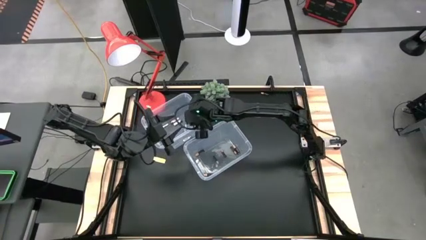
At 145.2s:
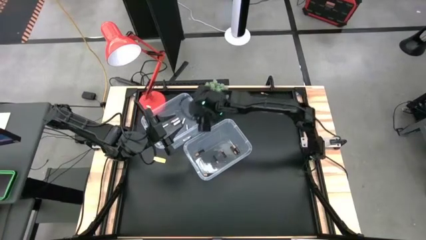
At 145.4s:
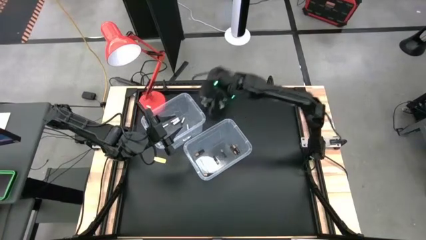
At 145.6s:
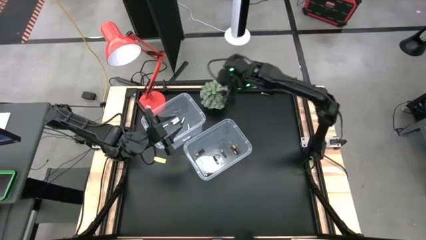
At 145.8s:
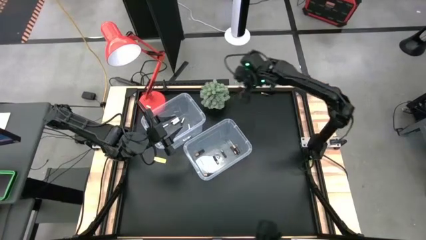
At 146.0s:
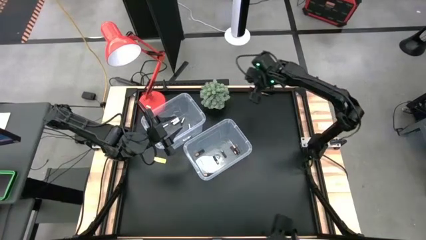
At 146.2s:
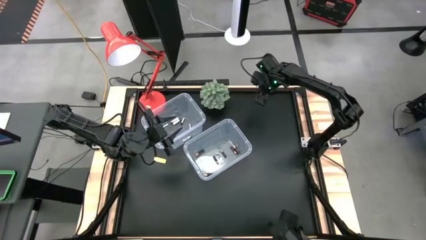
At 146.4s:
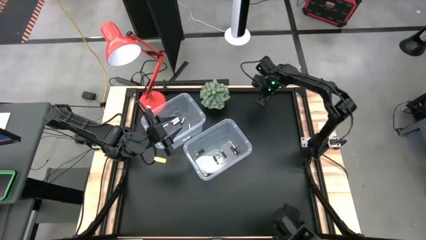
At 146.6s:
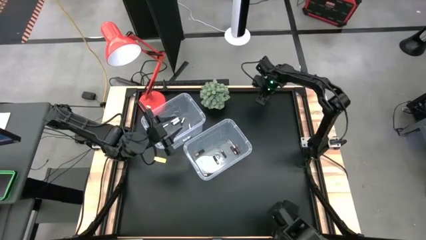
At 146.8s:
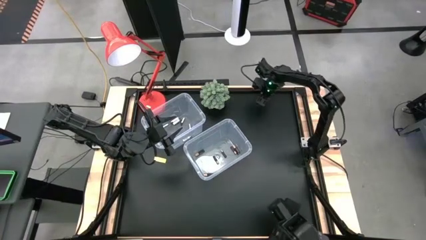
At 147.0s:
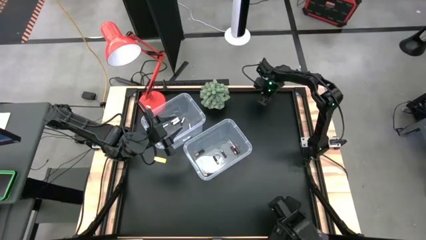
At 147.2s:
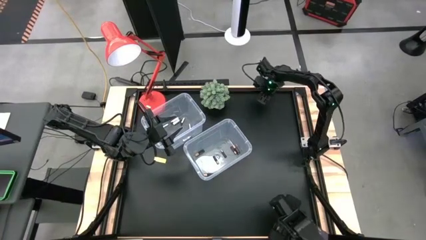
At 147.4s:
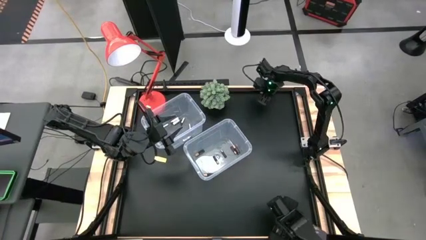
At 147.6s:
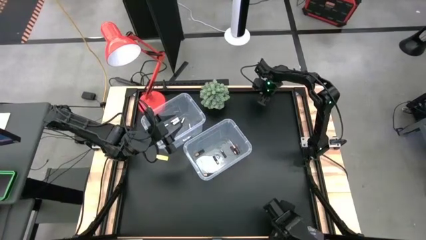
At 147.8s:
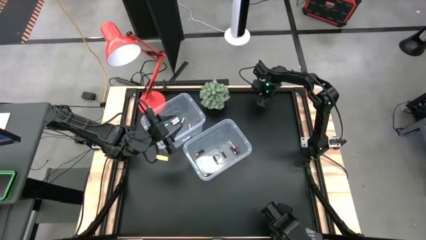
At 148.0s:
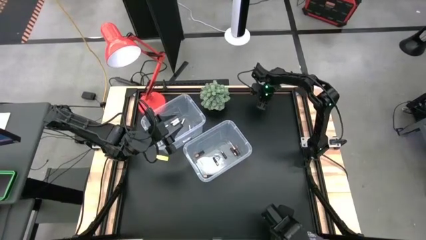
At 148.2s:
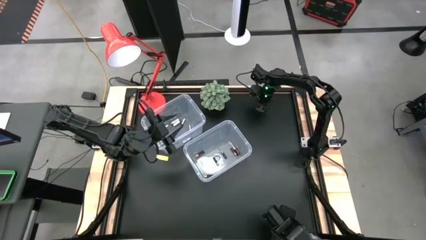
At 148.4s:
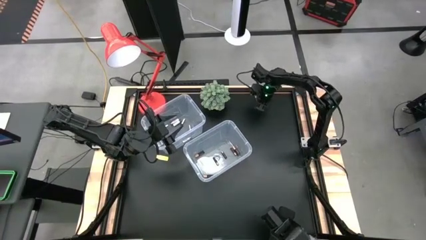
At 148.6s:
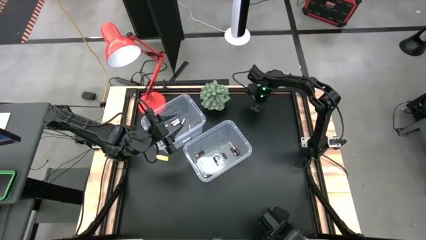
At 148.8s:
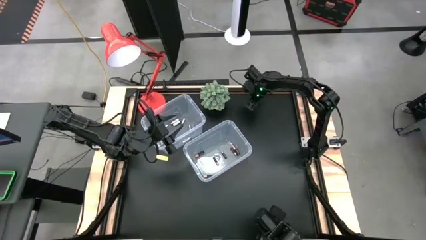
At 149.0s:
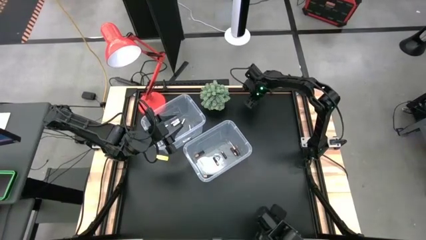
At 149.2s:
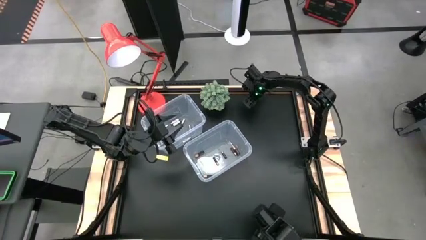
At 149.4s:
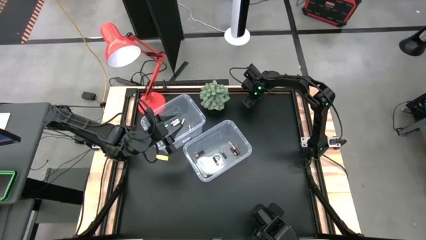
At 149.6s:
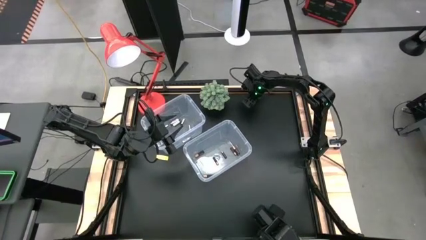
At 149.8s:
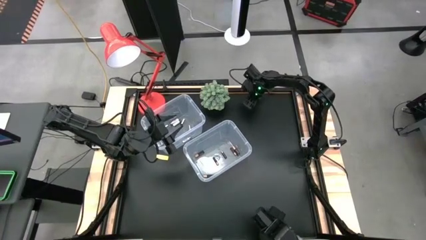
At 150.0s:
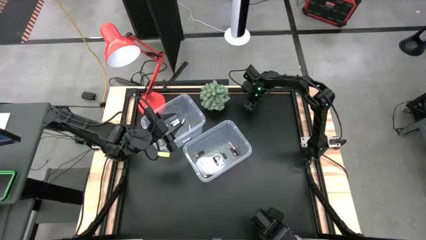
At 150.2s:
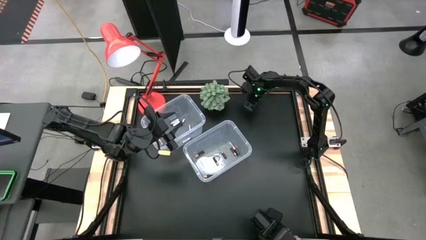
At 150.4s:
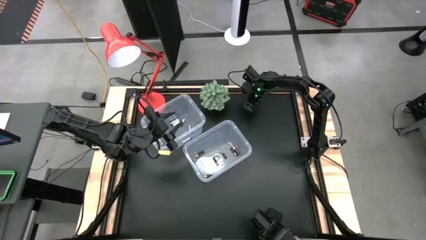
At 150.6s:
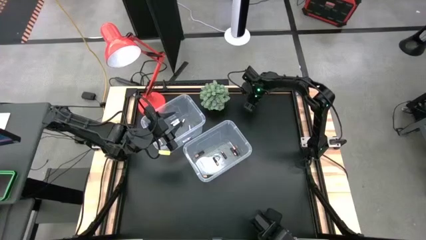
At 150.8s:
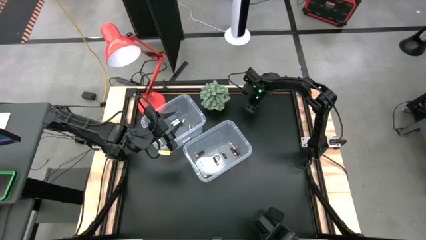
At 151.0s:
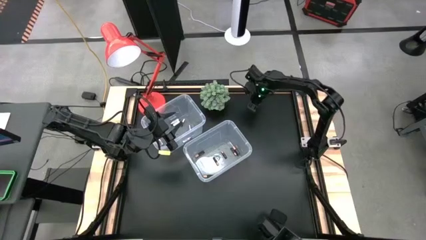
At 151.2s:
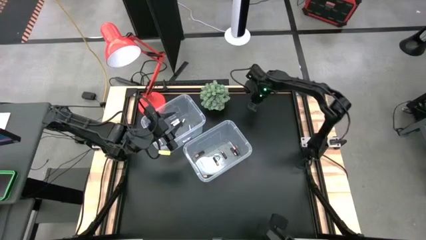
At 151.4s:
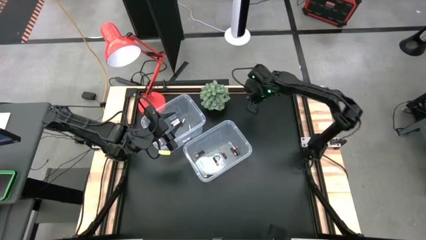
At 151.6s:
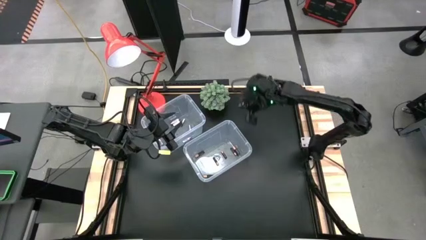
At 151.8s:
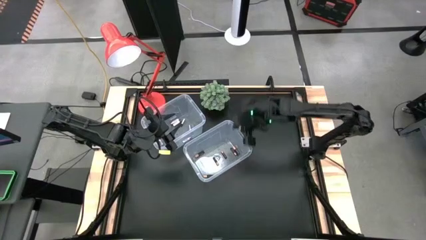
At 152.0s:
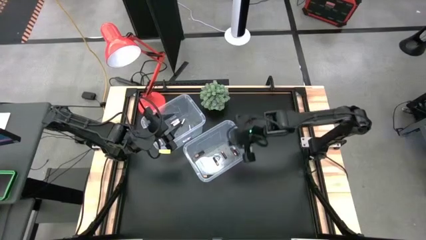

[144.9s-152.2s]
Task: Sort batteries
Put the brown battery into the bottom transparent bin

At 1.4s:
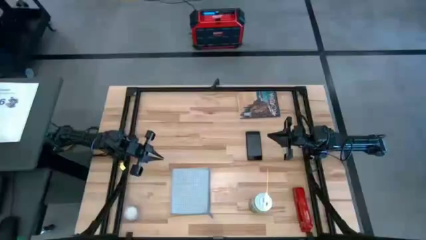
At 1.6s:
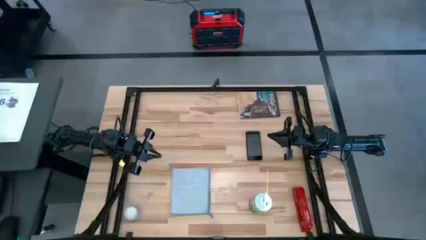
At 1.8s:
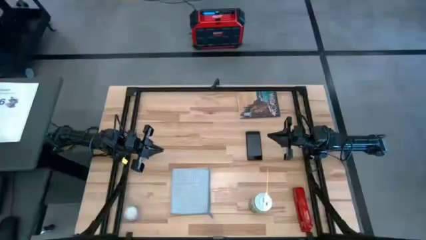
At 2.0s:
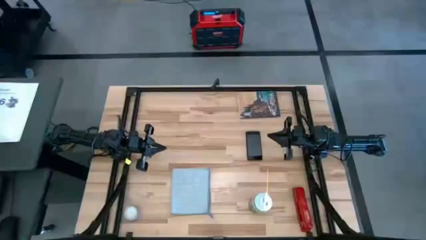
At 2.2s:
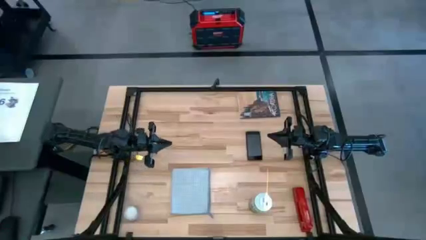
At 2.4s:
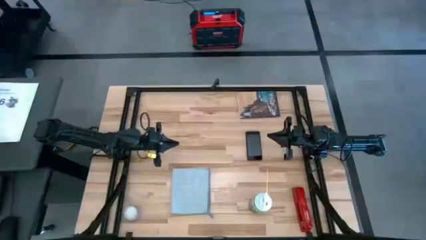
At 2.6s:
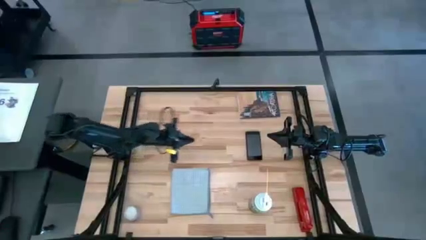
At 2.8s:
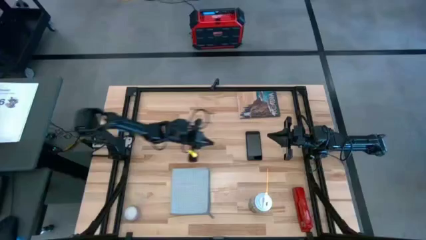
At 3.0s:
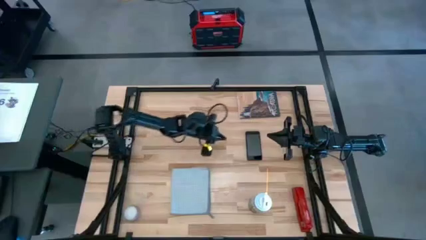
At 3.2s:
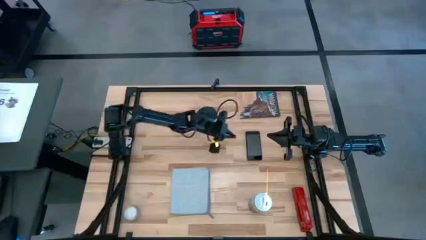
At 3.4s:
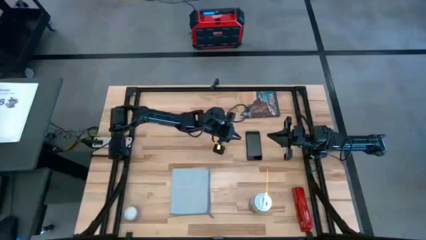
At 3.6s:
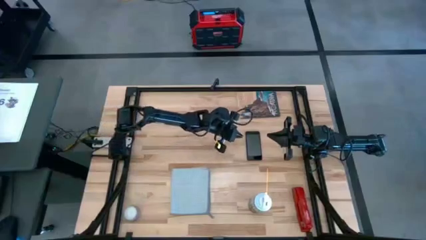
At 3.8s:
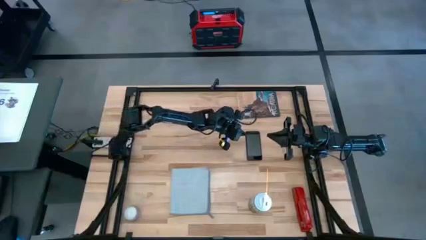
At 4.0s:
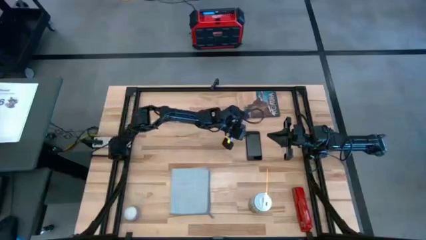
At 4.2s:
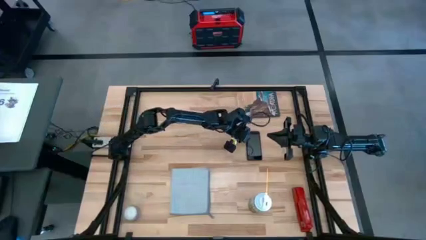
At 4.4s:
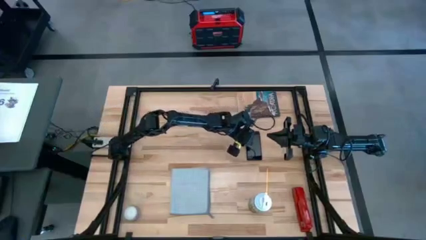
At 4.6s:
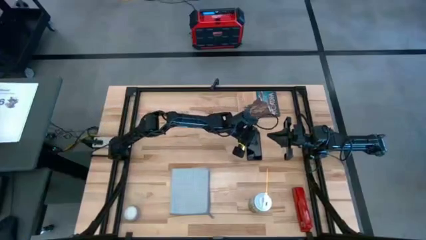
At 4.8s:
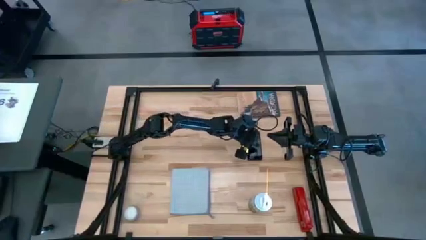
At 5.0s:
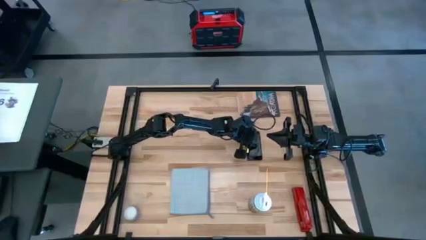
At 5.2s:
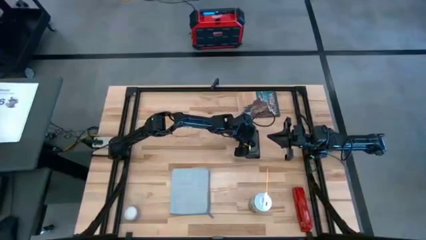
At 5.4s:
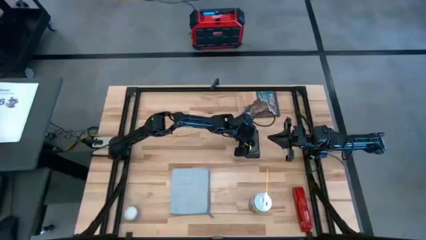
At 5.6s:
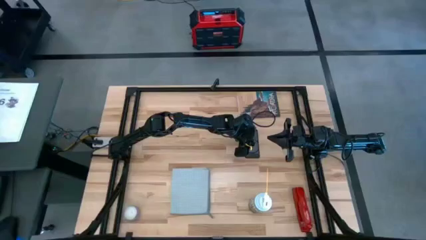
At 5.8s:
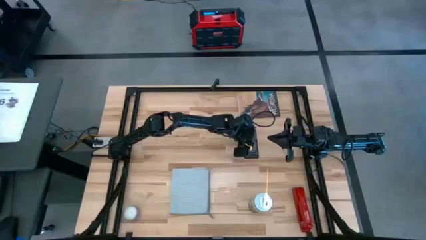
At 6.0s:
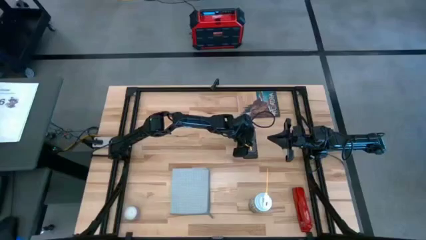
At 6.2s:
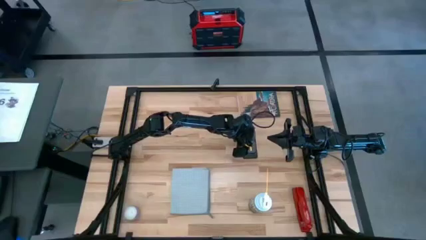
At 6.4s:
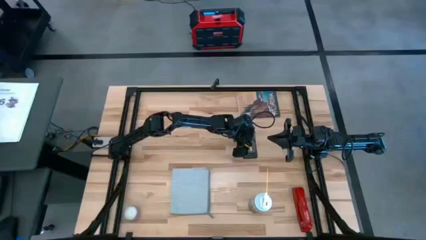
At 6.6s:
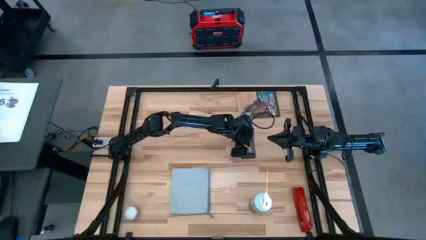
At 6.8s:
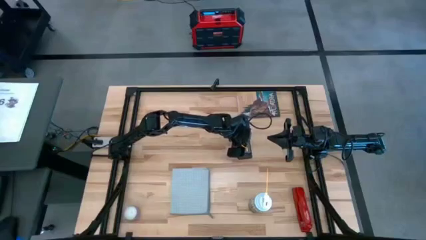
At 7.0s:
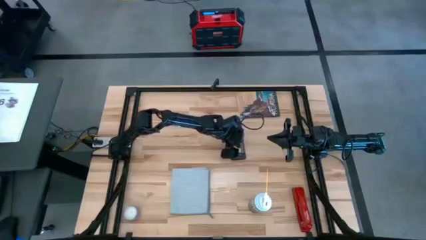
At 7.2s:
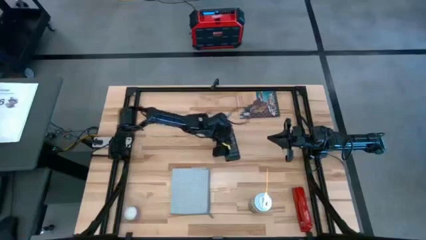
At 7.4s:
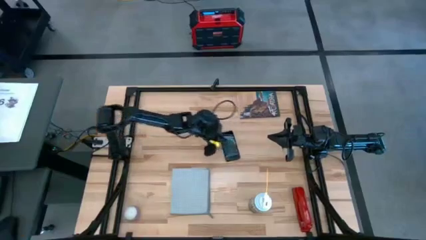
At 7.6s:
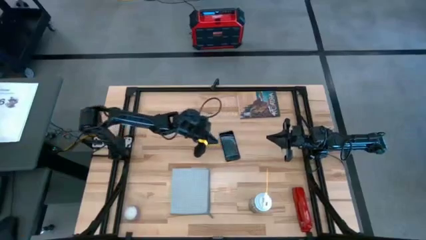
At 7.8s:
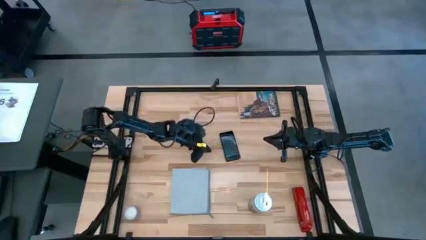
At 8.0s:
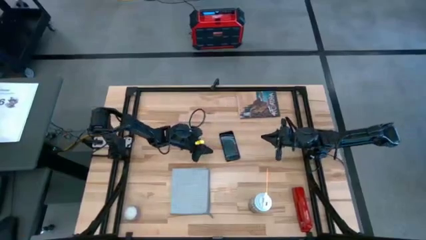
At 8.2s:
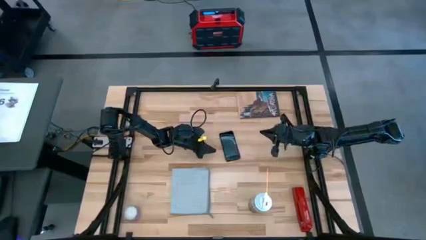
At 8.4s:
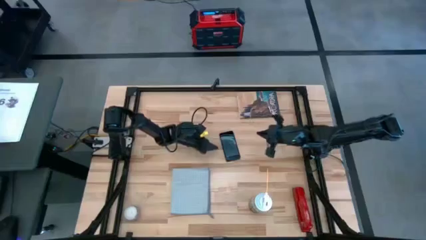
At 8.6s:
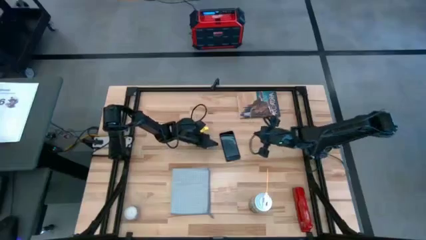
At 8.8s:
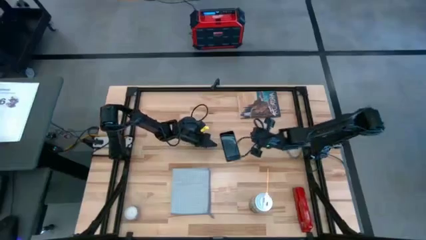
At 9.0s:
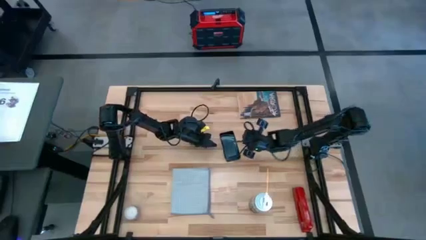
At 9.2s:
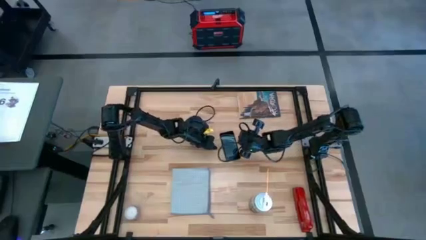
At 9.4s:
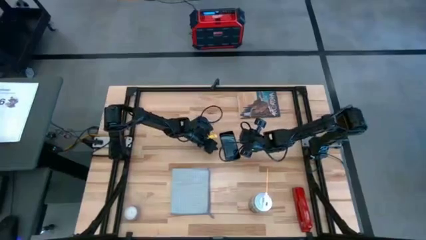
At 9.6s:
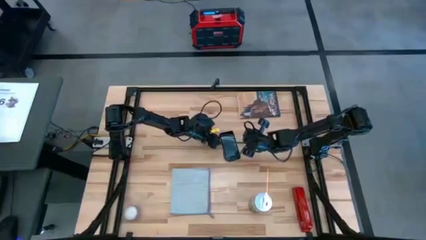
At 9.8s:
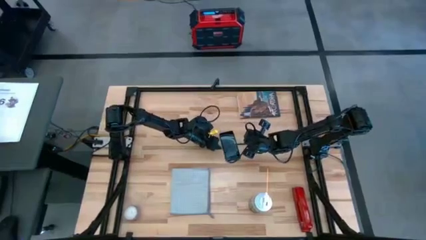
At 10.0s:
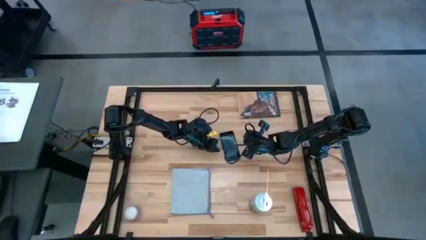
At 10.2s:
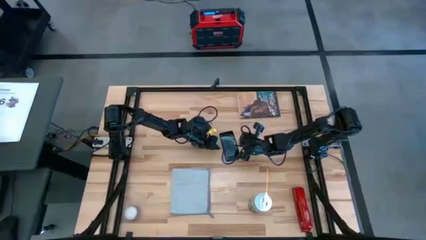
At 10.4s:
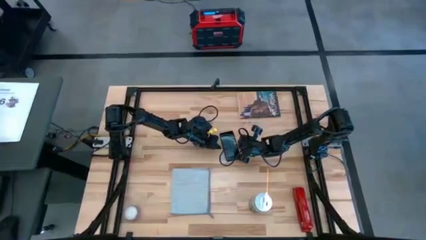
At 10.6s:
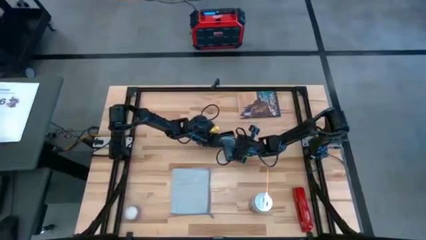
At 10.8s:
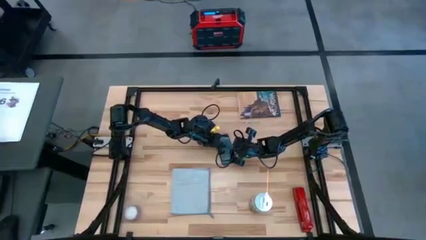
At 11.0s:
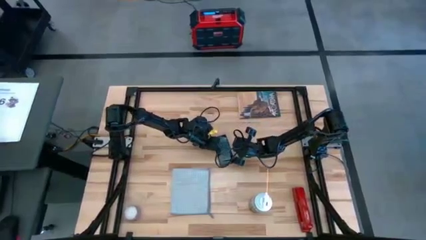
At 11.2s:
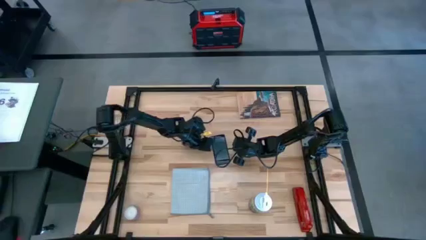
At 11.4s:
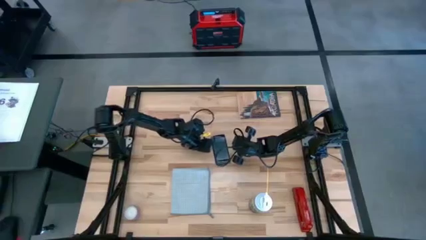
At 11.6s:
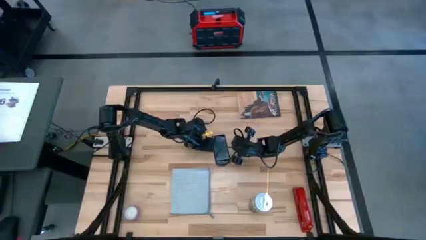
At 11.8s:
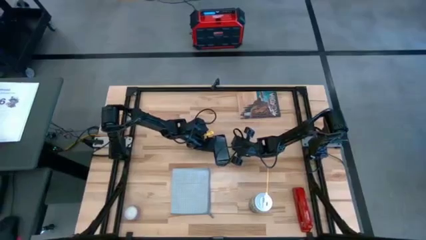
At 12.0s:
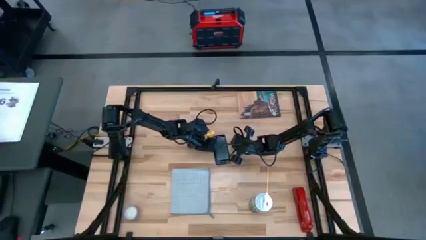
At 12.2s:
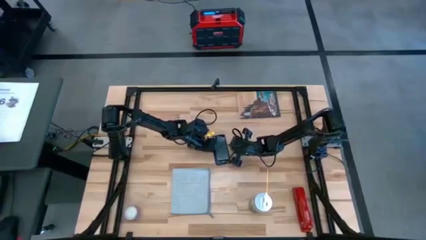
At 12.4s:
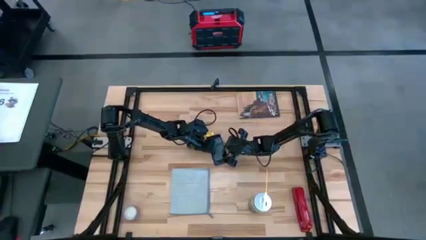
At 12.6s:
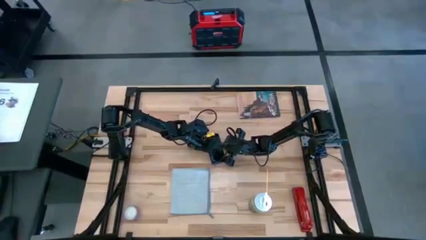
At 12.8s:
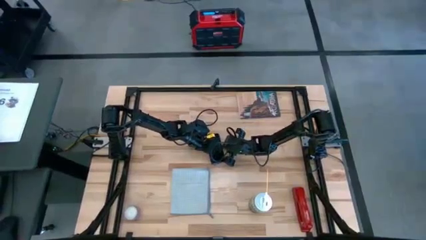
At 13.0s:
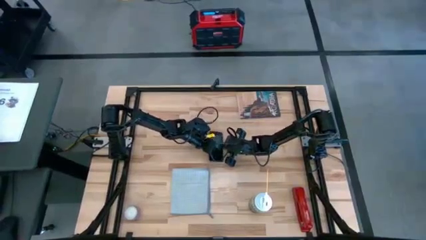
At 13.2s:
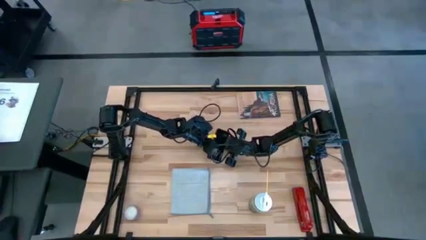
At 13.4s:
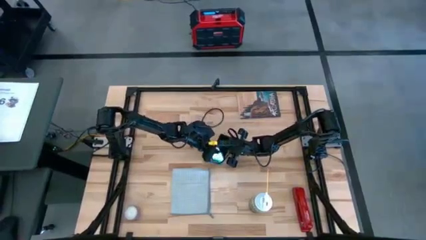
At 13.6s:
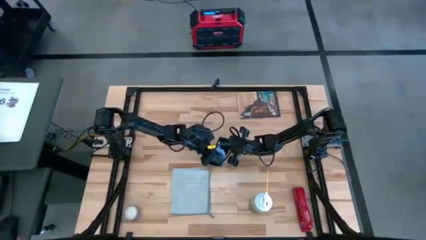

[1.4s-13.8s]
Task: Apply microfiber cloth
Spray the front of the black cellphone using the white spray bottle
